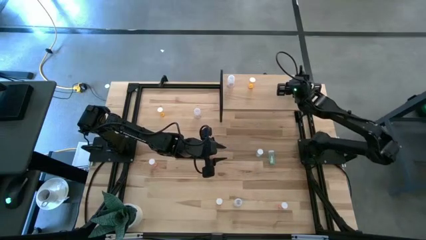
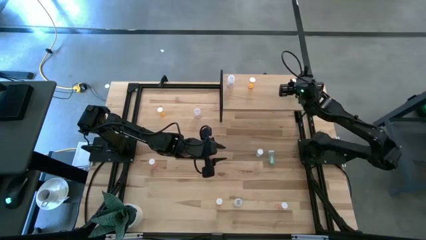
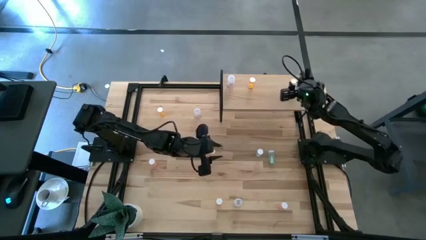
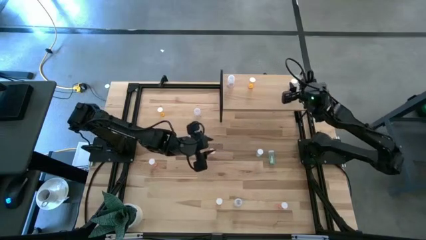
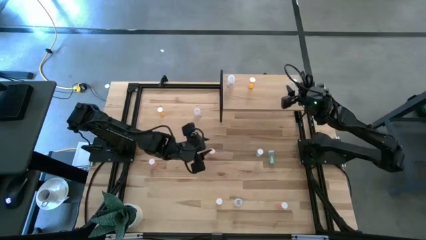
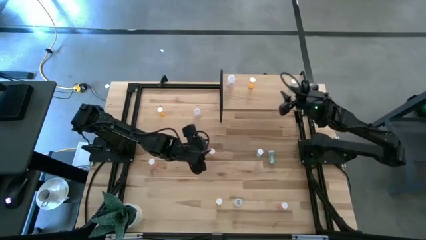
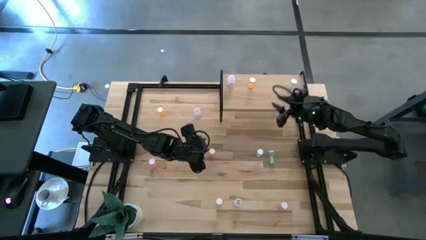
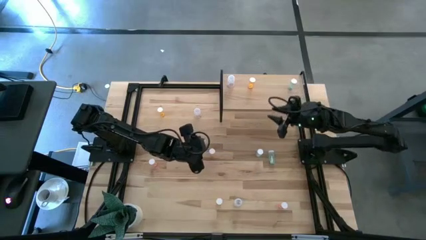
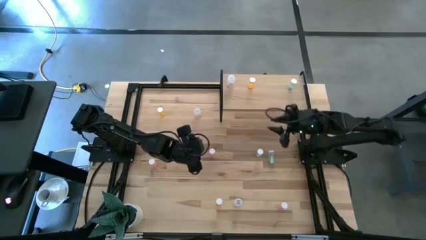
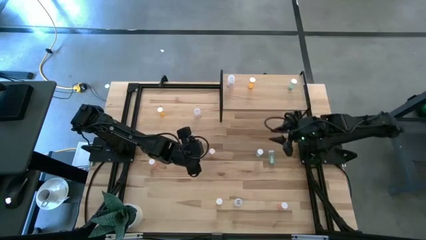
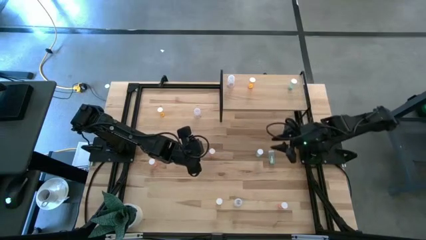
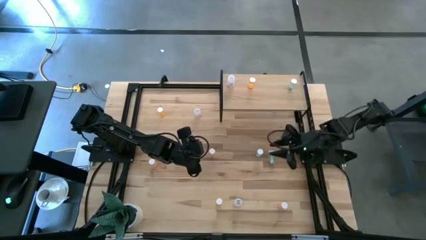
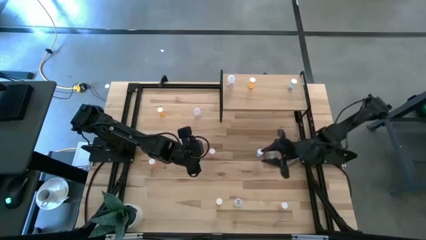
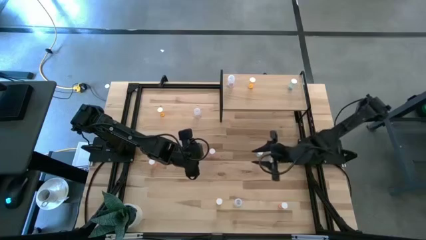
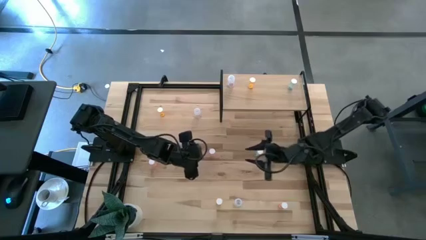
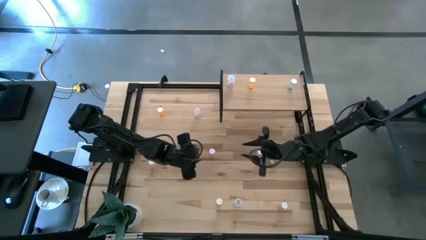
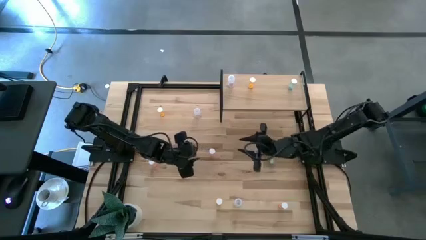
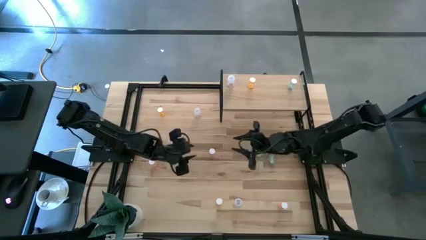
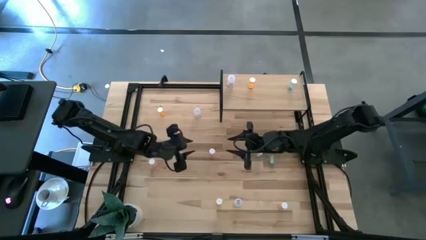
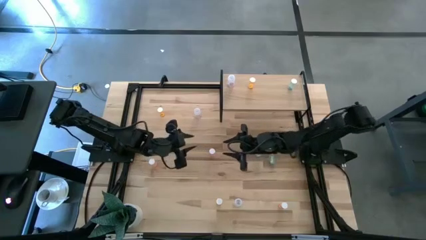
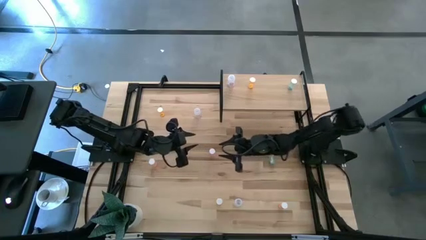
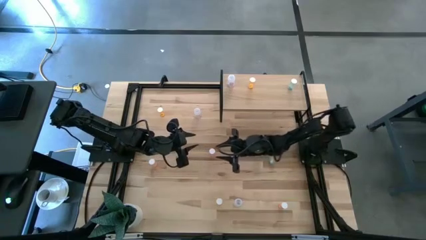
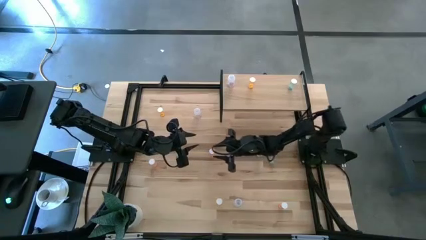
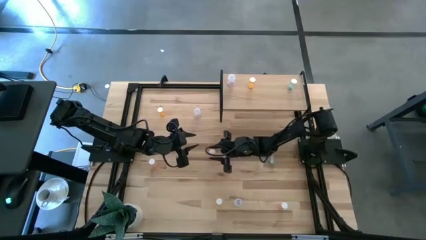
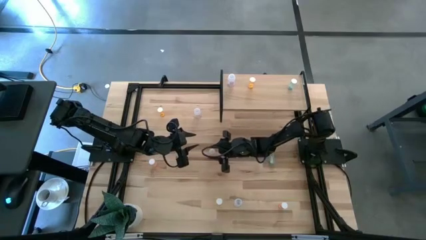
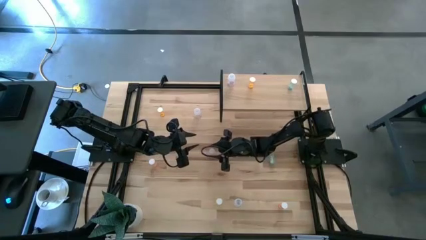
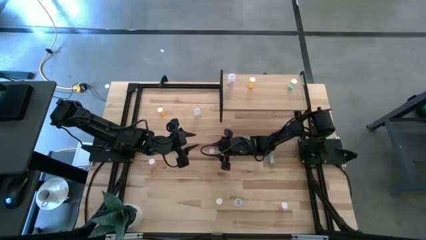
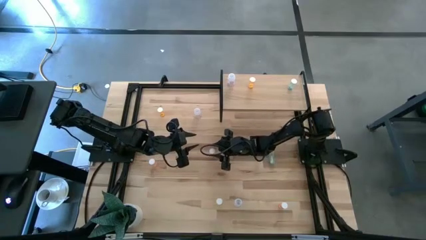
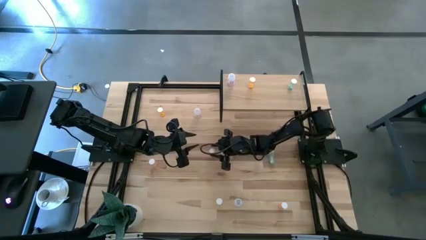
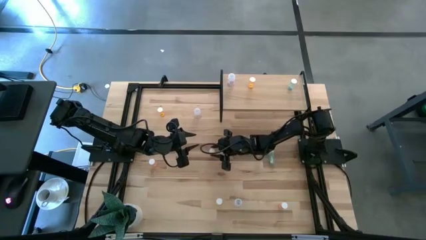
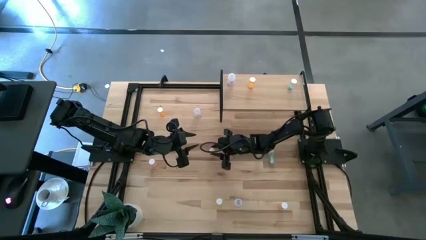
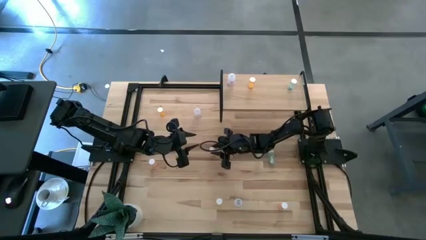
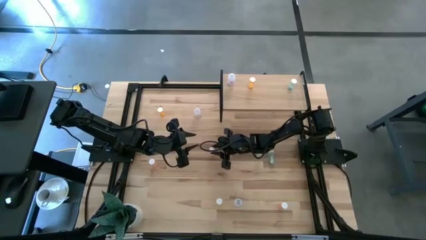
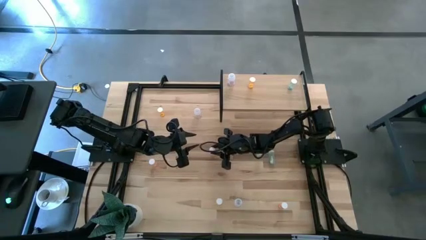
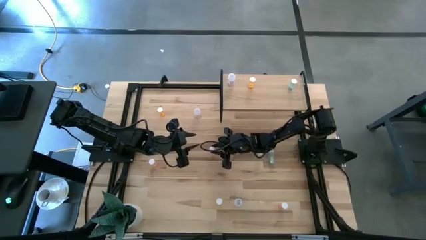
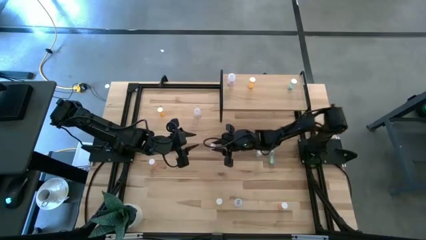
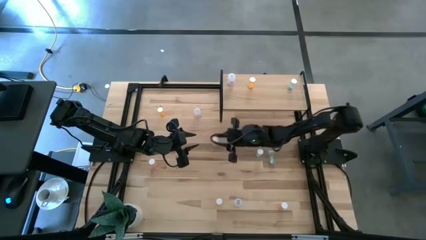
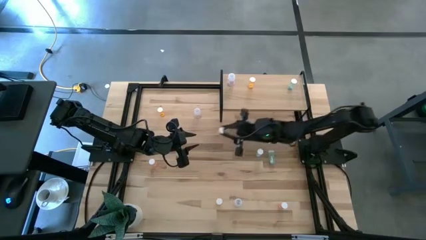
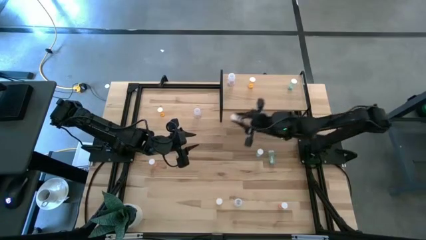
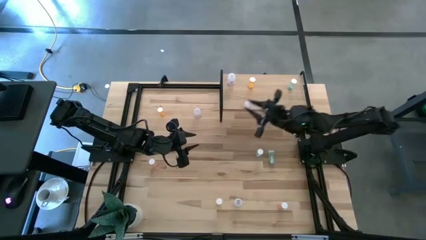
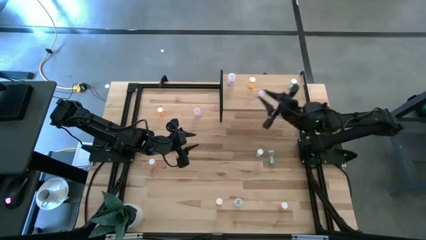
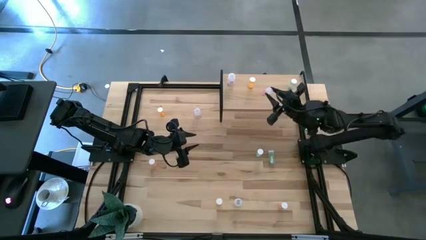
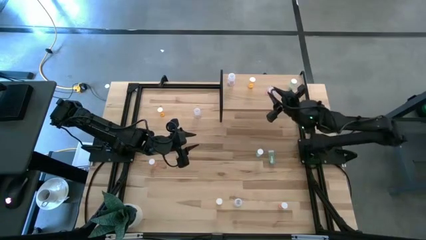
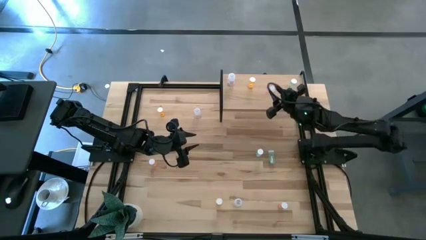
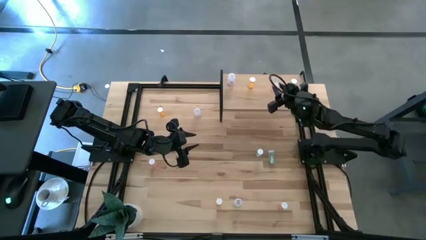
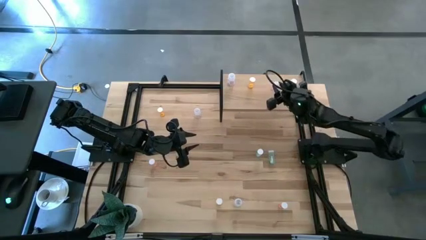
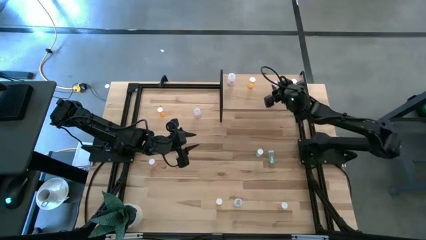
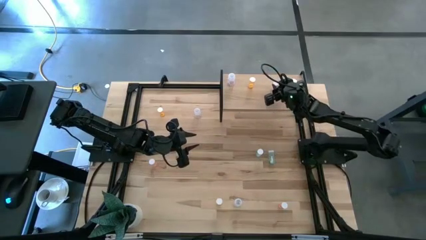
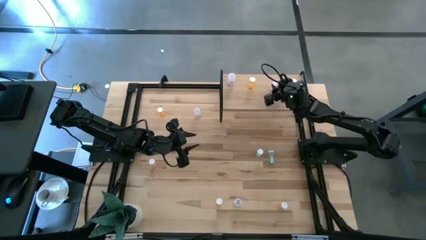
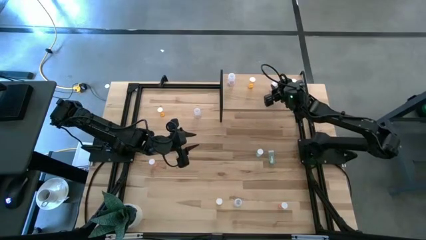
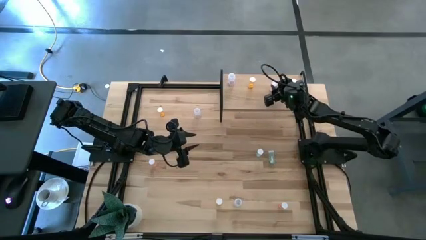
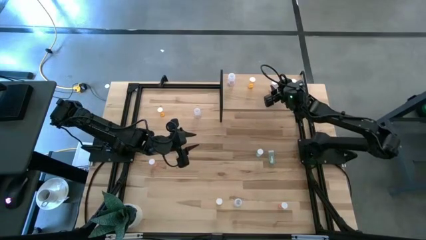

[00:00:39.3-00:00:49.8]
Task: Pick and place medicine bottles onto shelf by color
Put the center pink pill bottle on the shelf

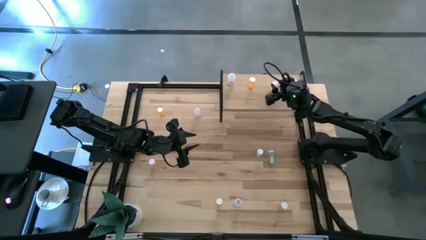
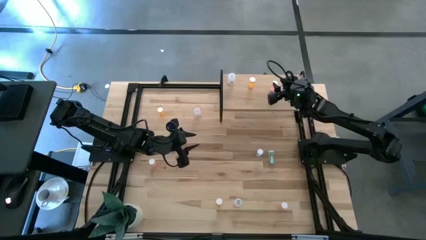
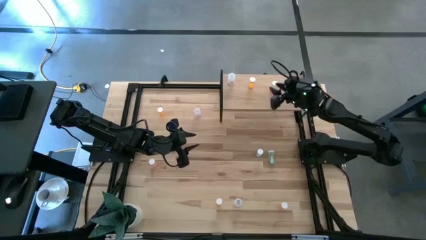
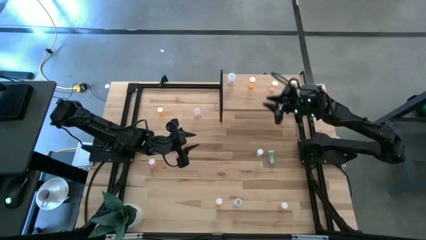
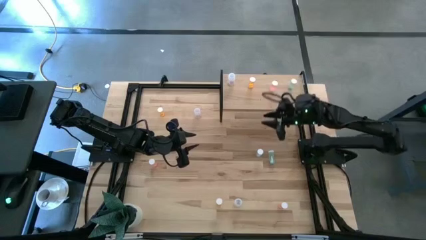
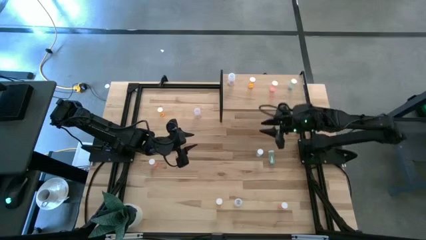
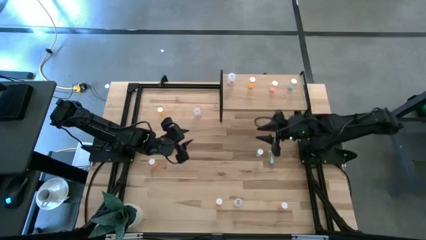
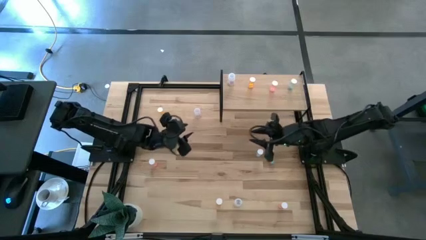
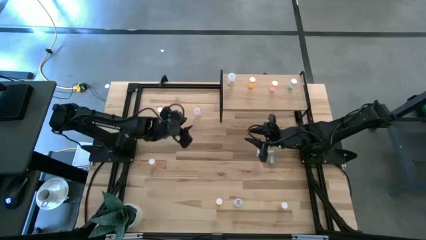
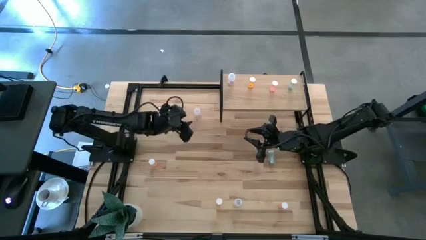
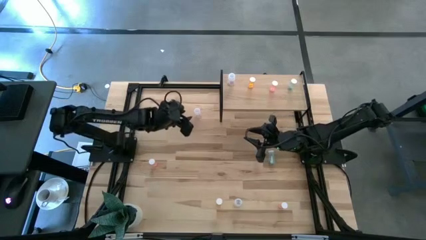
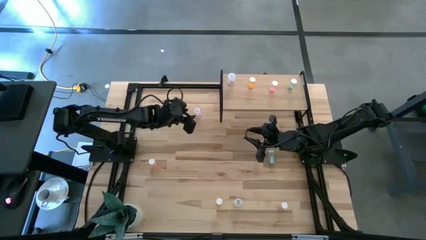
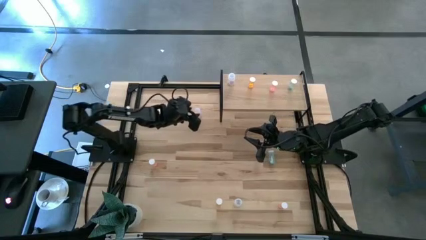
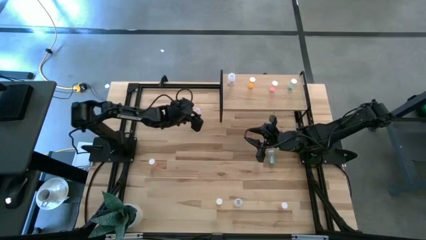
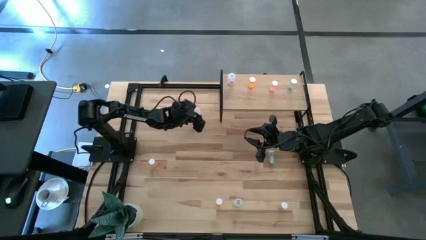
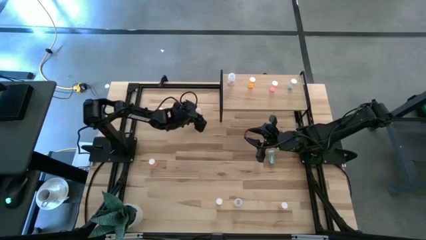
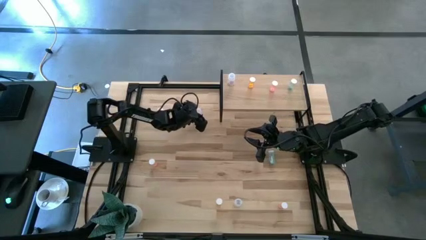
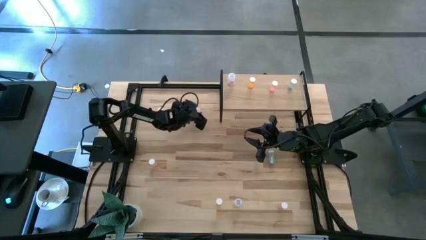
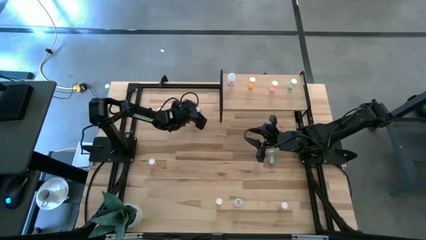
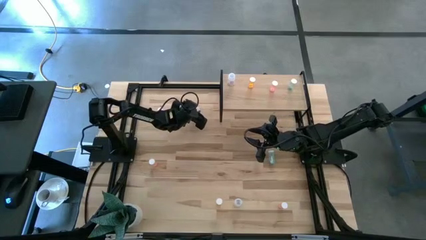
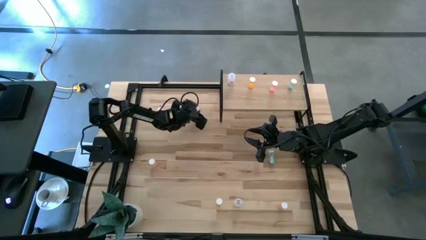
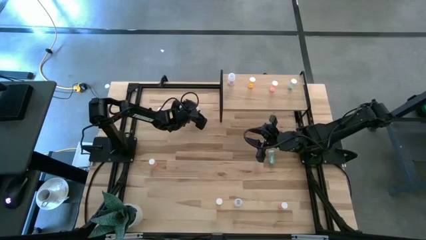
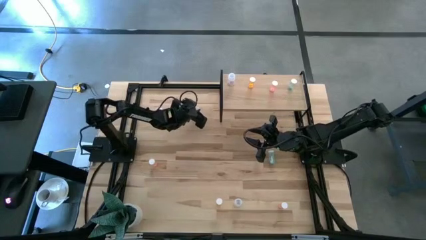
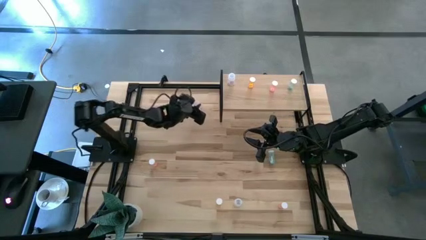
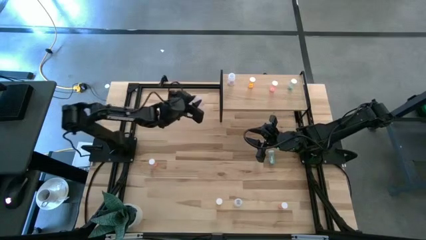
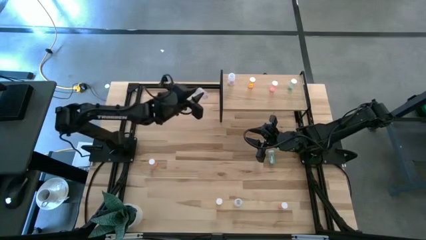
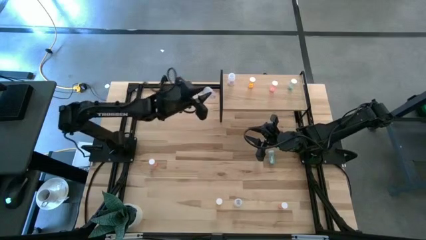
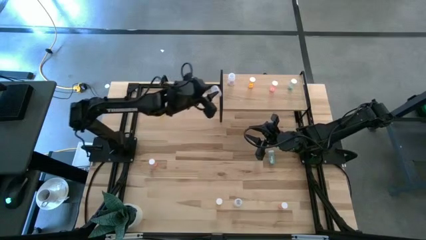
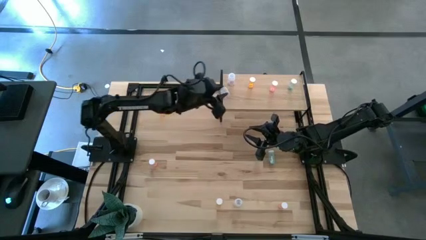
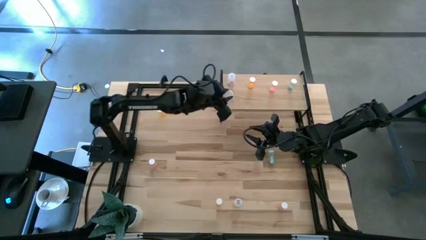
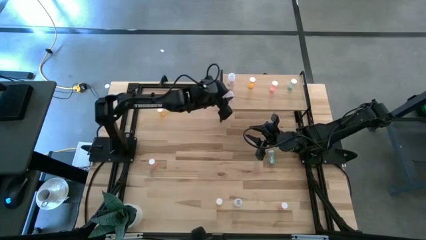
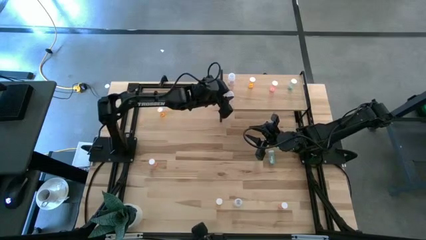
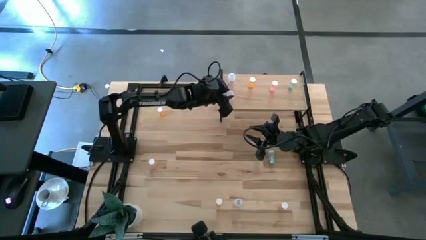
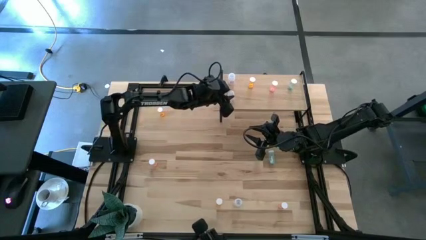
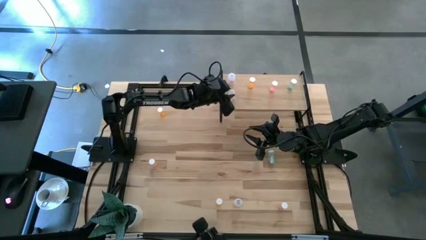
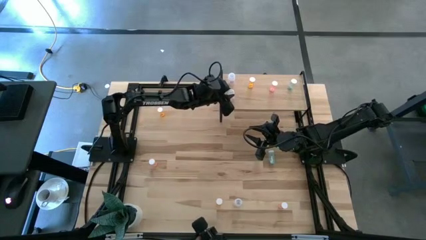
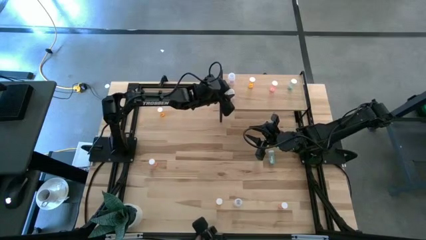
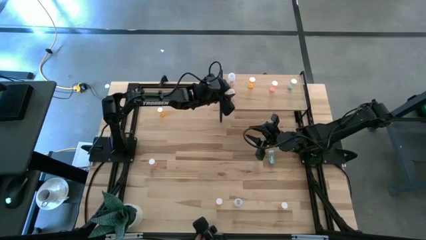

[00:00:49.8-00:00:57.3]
Put the top transparent pill bottle on the shelf aligned with the other transparent pill bottle
